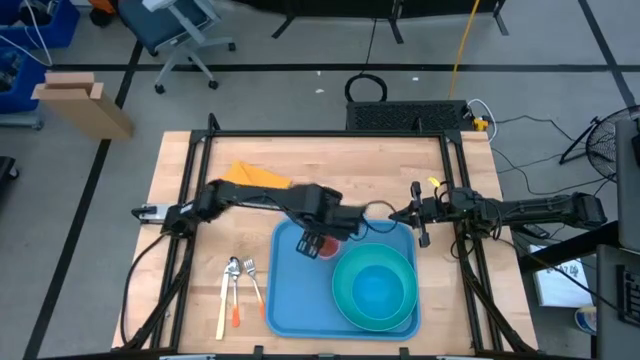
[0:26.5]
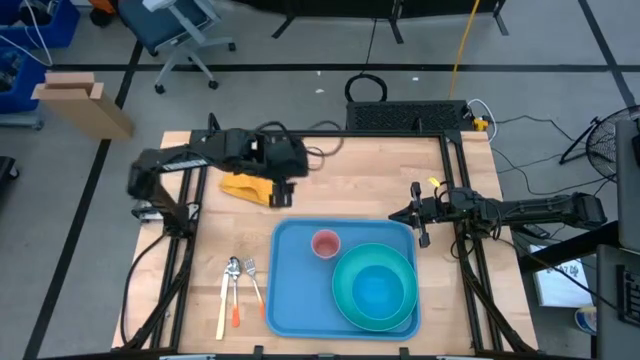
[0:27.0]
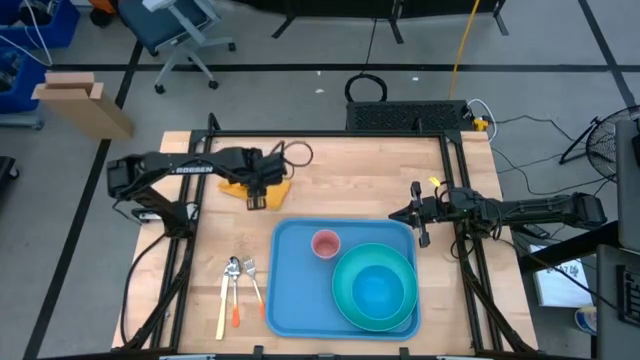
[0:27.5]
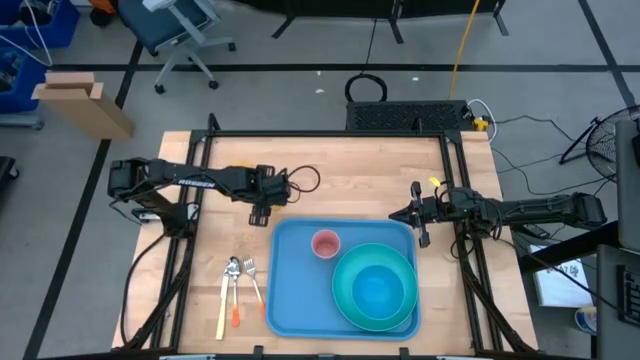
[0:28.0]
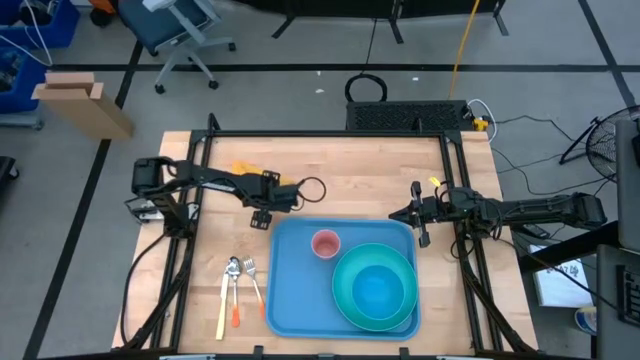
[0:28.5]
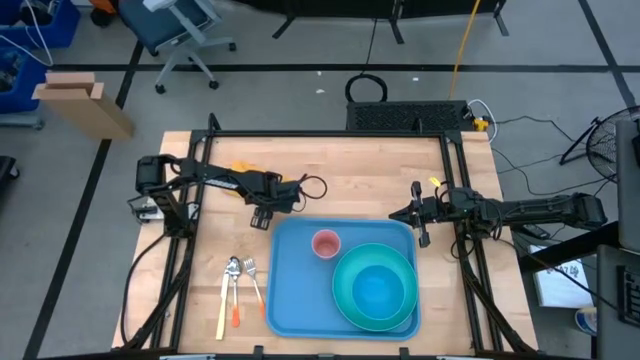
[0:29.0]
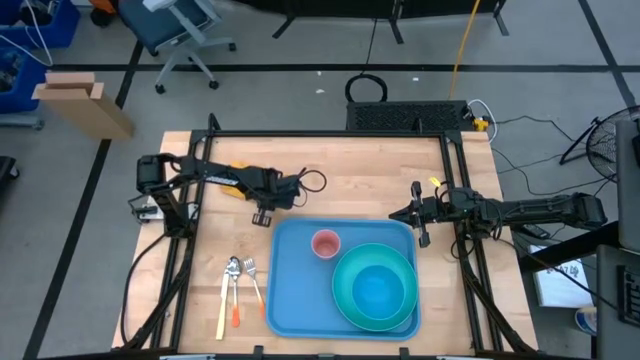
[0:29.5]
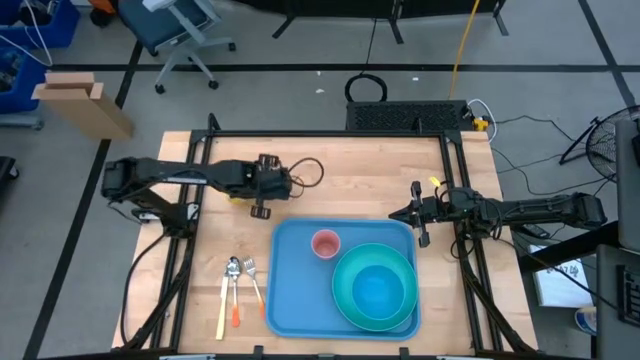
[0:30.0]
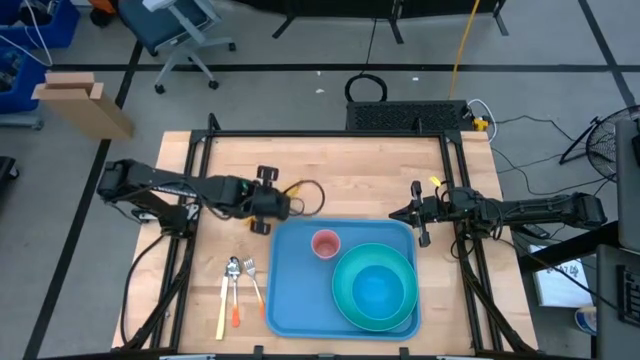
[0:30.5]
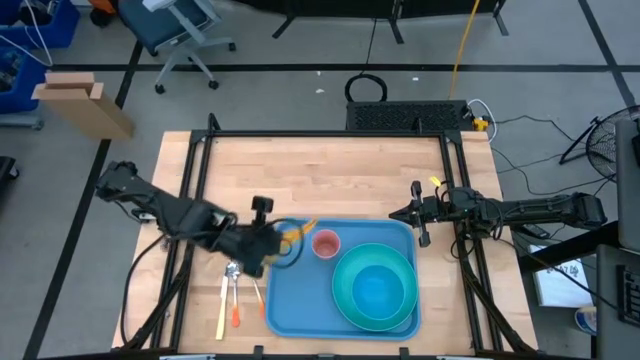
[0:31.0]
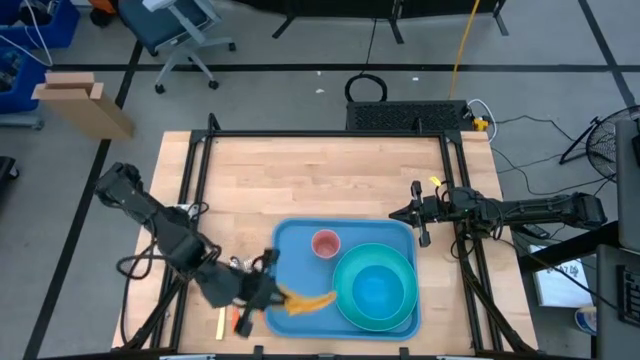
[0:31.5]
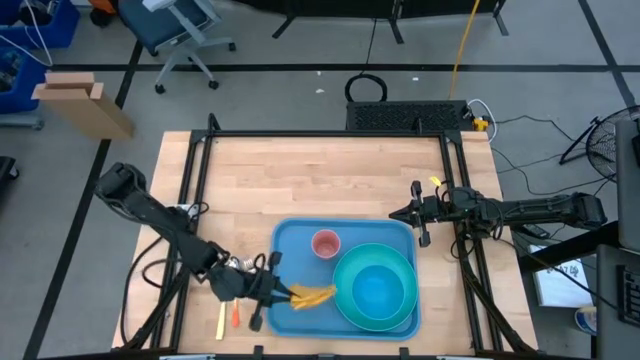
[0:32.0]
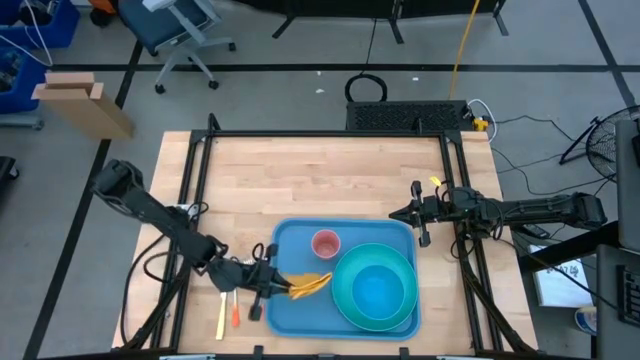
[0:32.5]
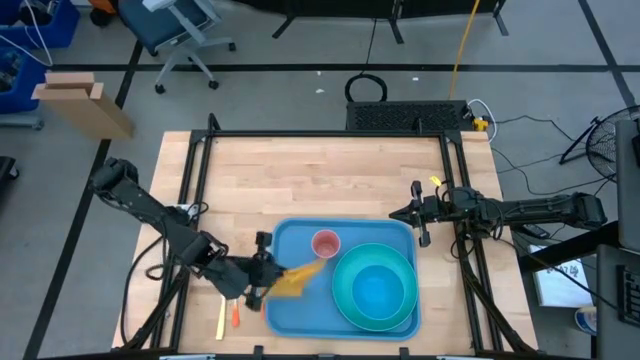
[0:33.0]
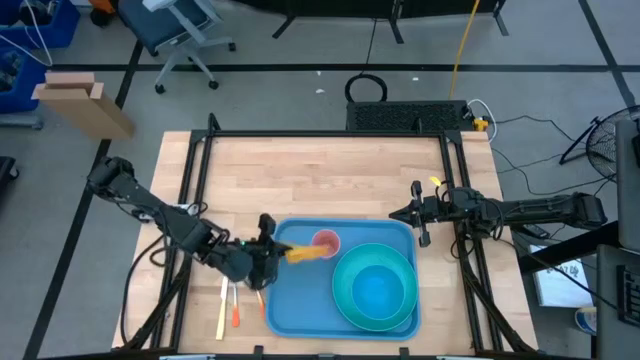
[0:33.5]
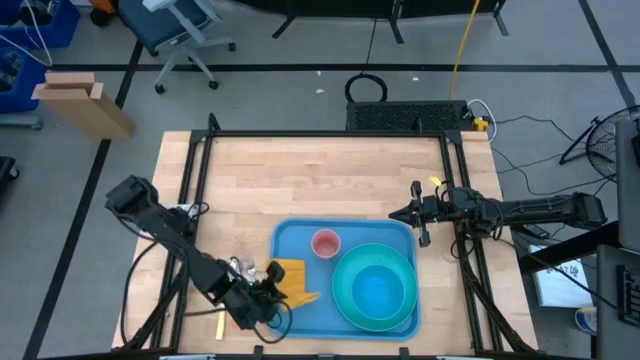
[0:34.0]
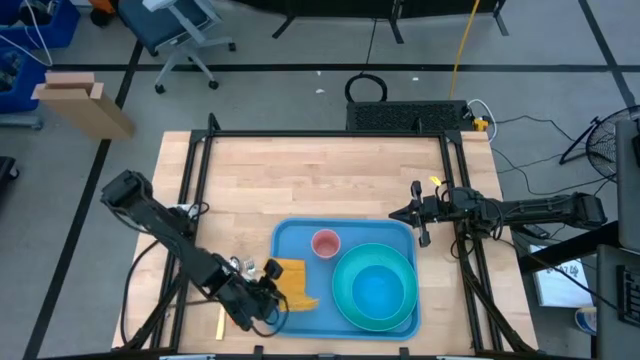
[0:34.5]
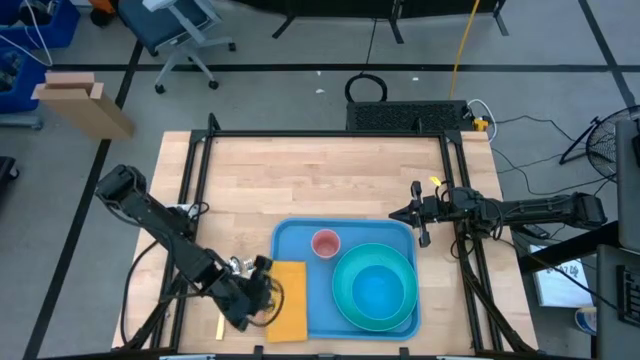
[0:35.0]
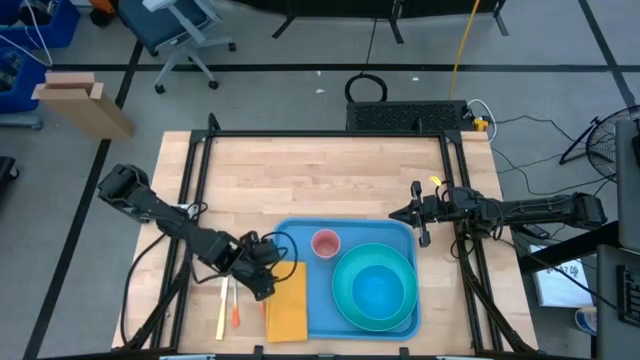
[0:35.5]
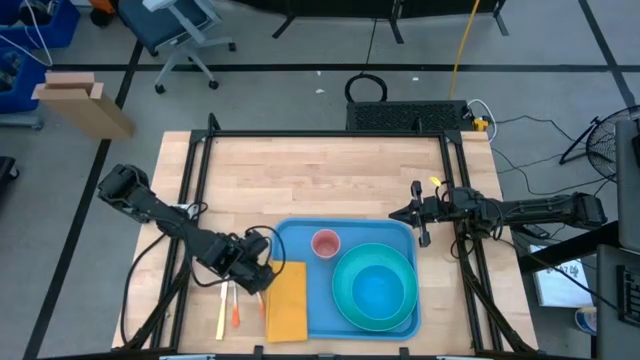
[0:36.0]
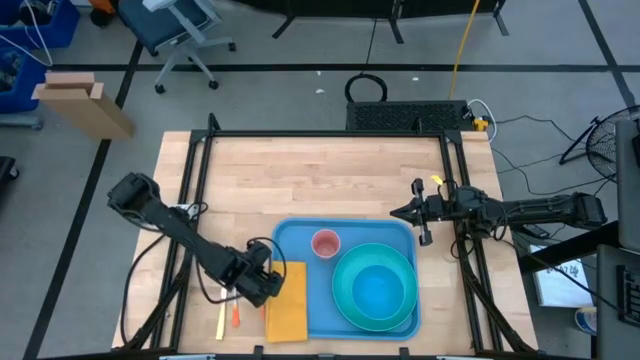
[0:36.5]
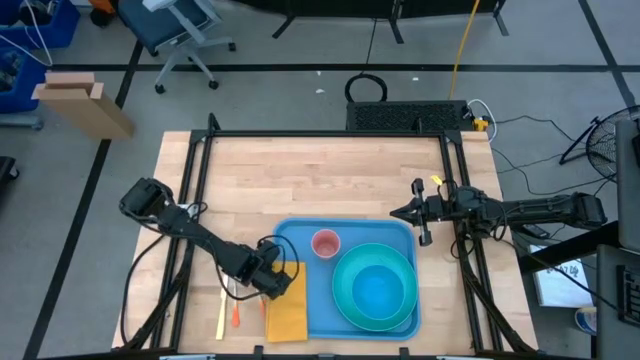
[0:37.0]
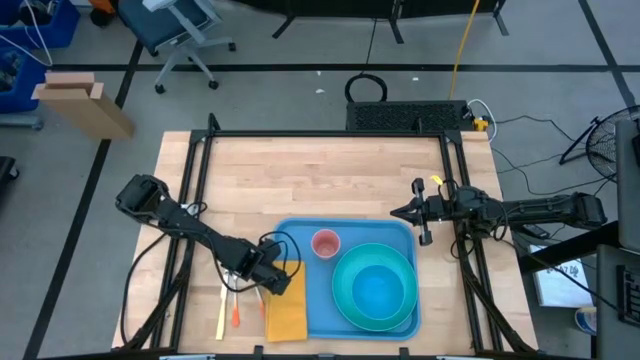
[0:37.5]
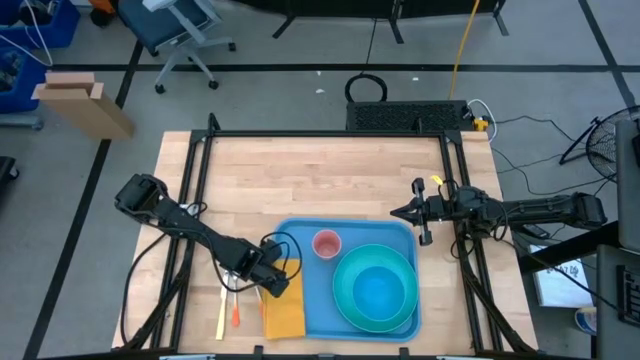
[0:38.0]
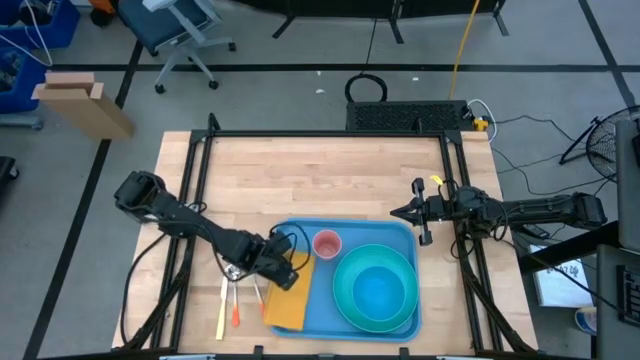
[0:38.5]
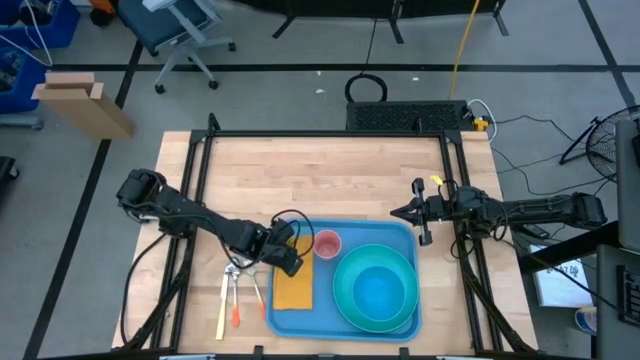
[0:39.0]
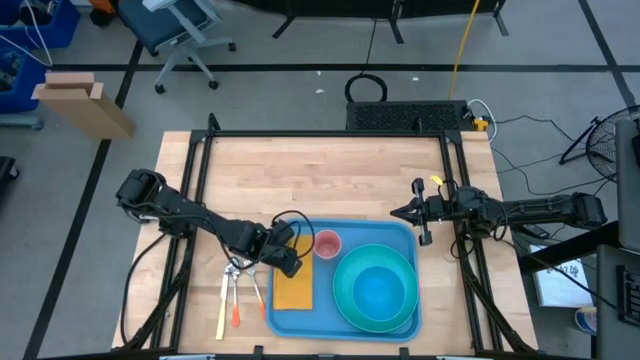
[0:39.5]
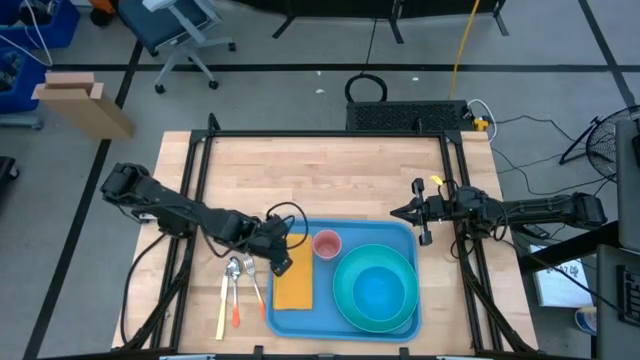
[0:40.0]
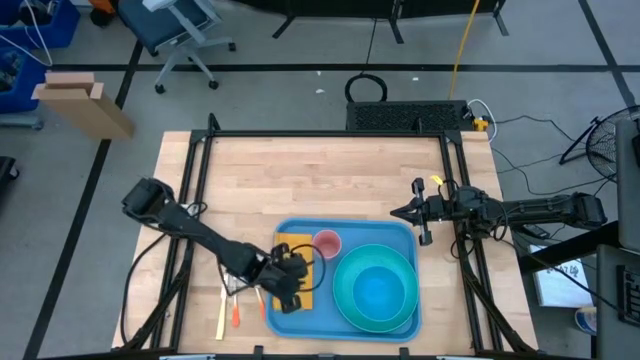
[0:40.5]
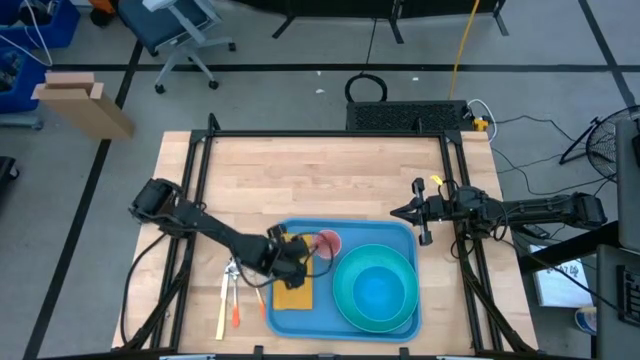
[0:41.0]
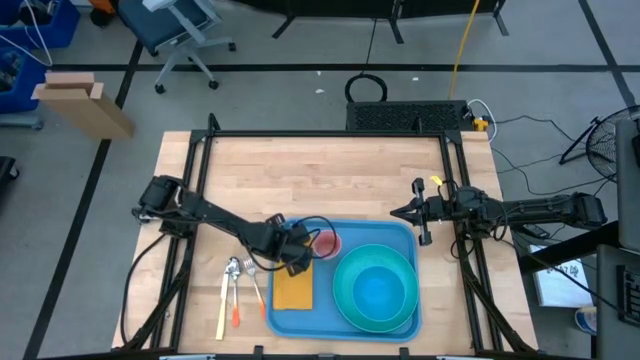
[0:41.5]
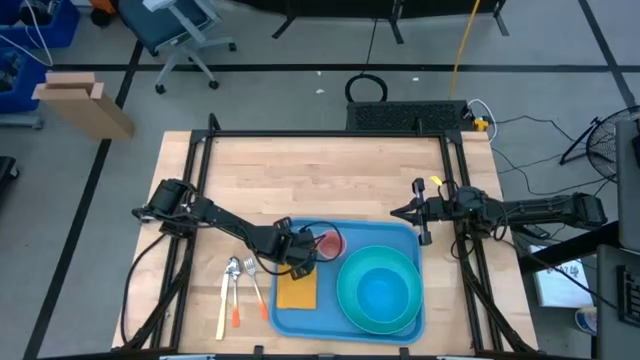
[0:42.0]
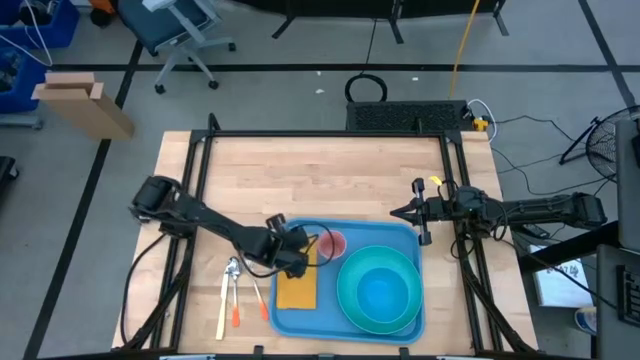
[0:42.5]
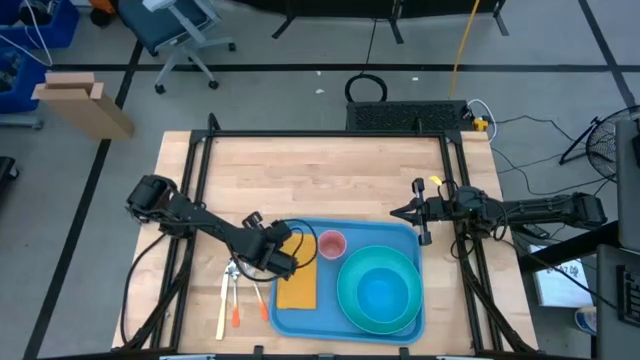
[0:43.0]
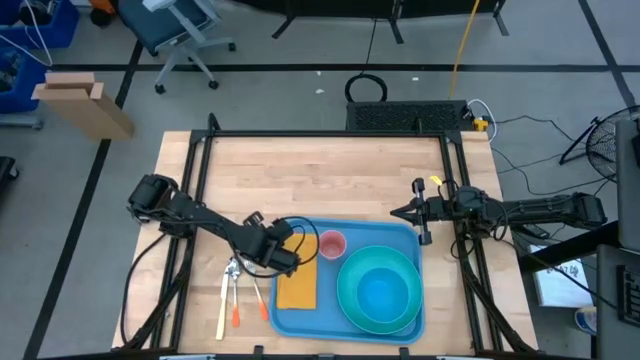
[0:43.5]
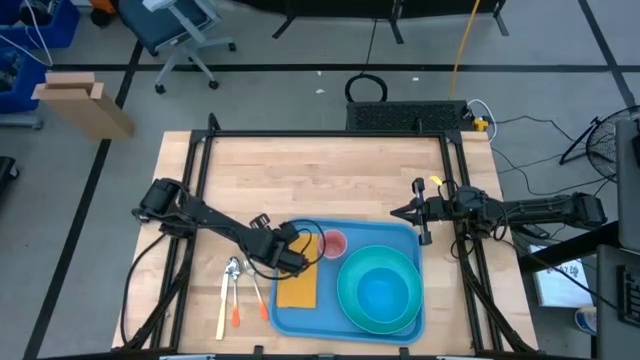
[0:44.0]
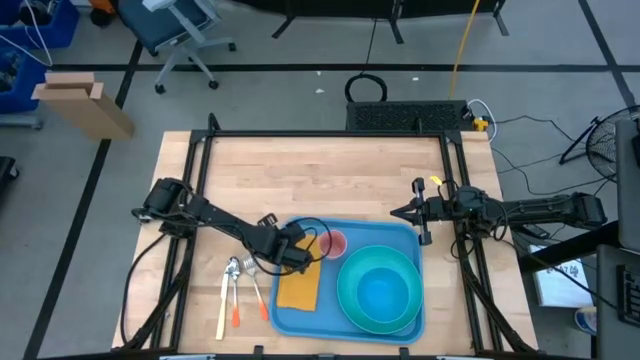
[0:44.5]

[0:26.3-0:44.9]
Task: Set up tray
Put the yellow napkin on the blue tray

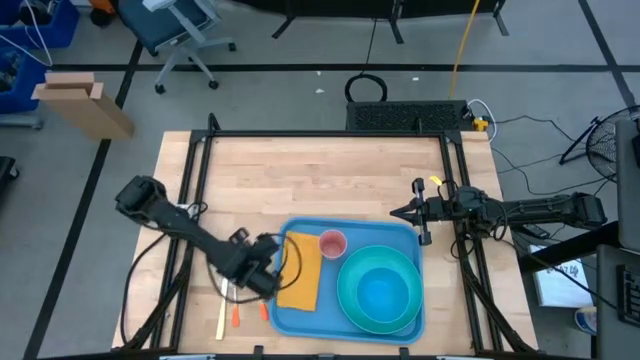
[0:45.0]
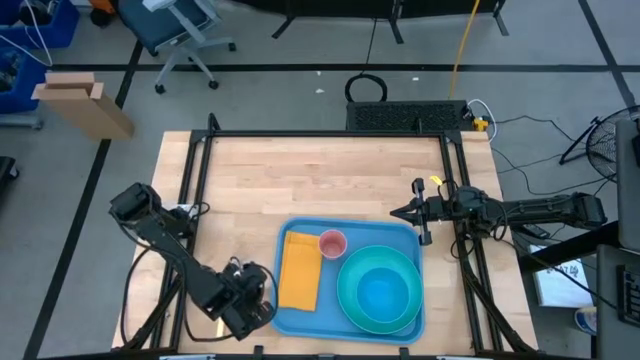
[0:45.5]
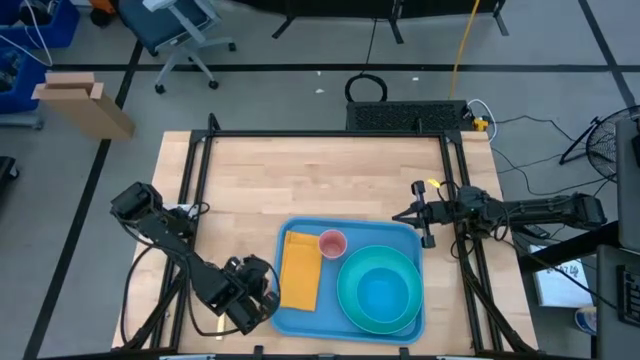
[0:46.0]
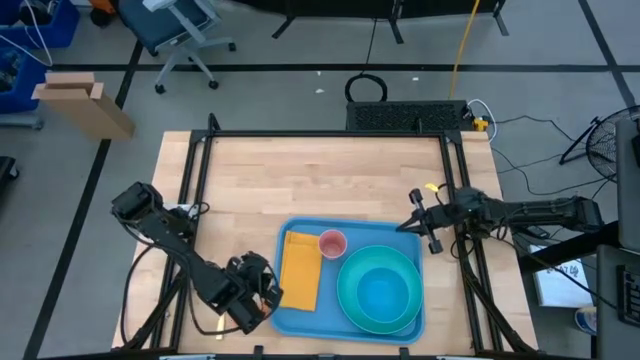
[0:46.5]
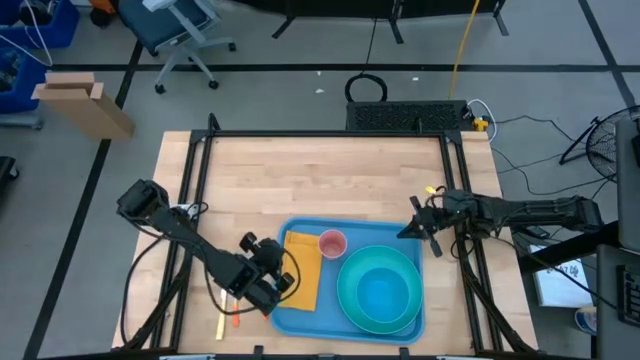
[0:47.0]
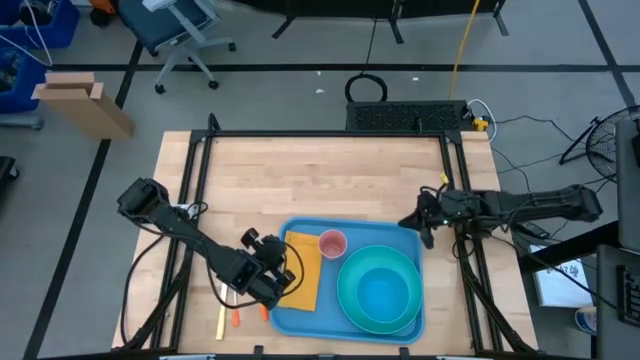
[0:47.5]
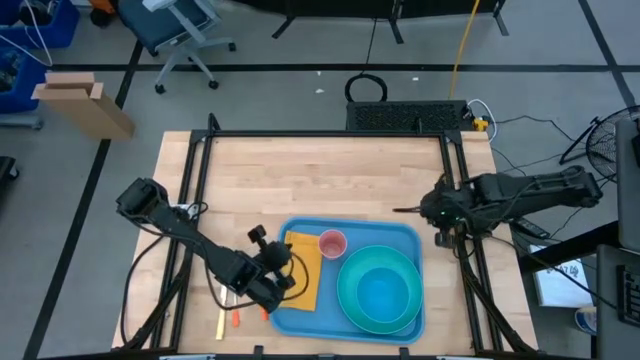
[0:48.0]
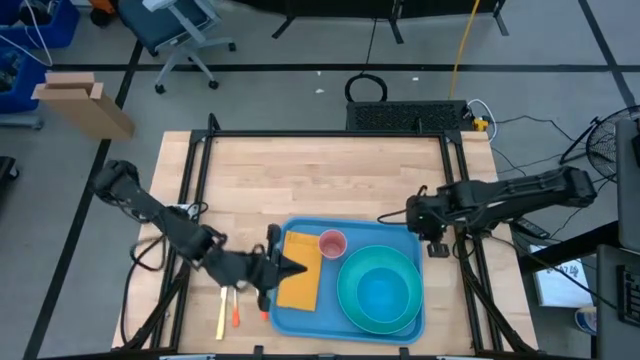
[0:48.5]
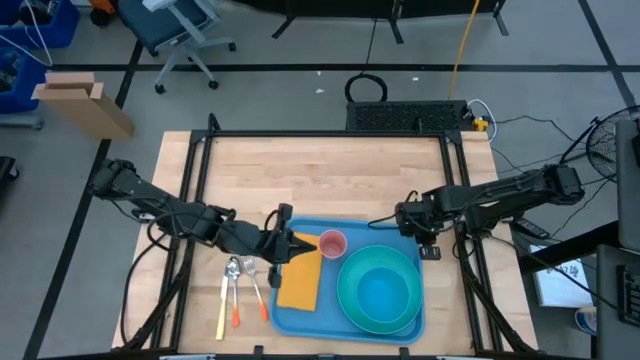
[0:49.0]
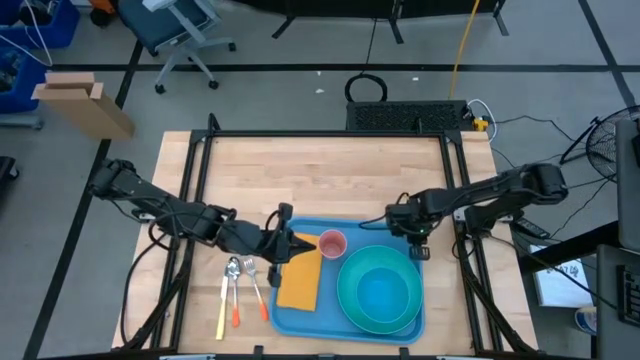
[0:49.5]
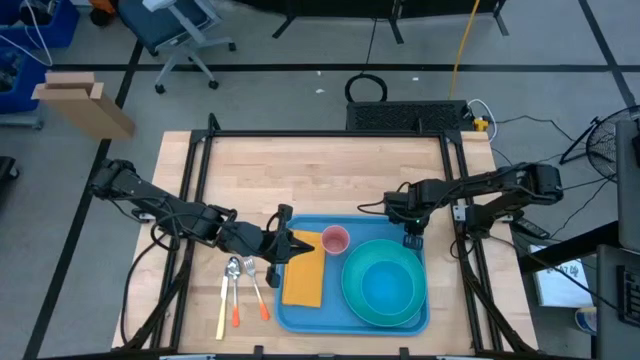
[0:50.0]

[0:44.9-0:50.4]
Adjust the blue tray
